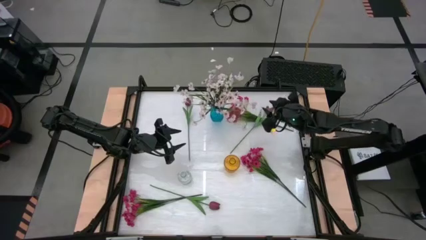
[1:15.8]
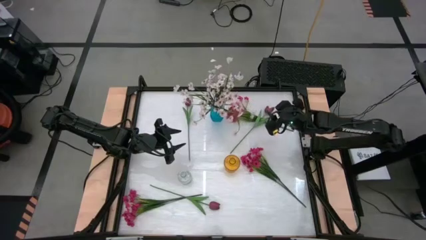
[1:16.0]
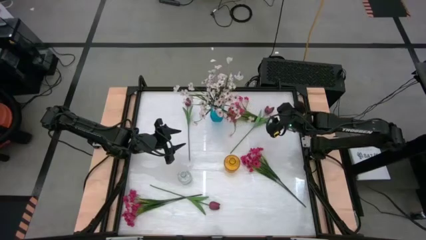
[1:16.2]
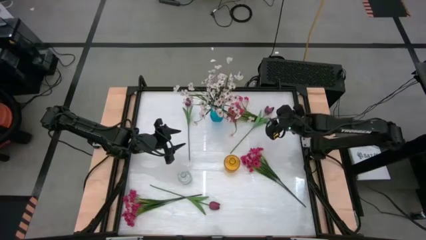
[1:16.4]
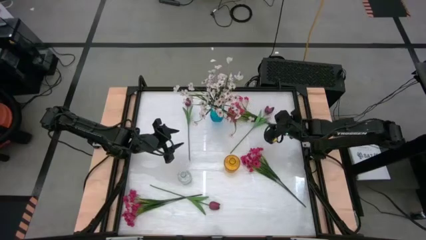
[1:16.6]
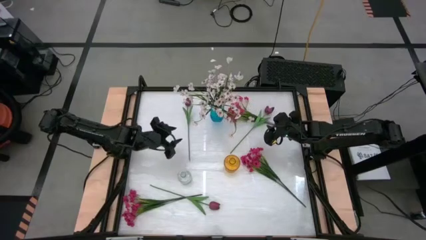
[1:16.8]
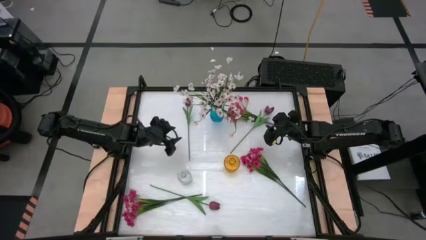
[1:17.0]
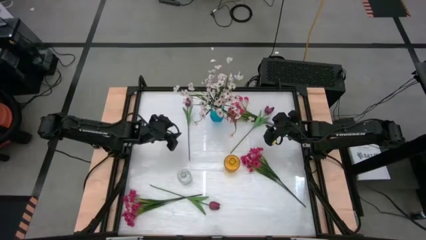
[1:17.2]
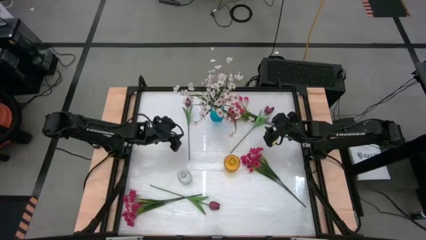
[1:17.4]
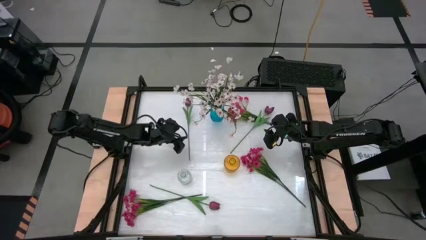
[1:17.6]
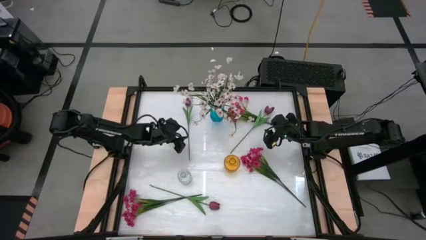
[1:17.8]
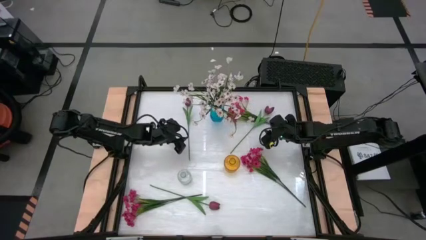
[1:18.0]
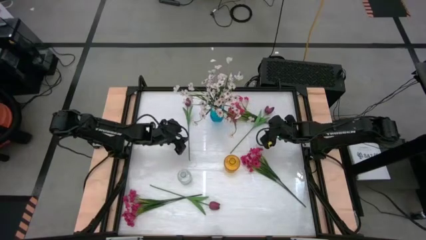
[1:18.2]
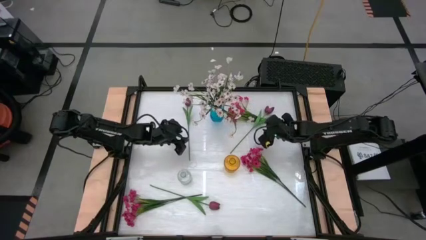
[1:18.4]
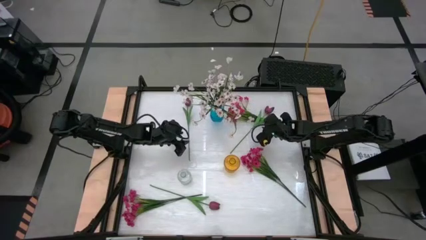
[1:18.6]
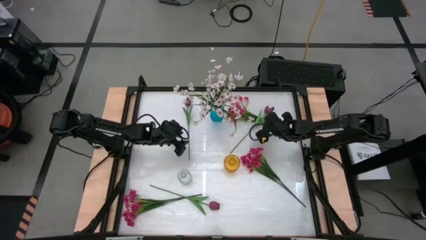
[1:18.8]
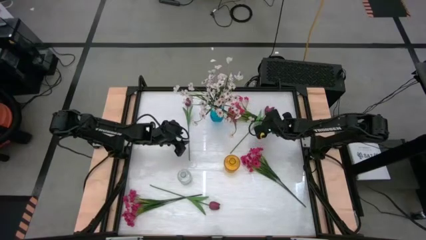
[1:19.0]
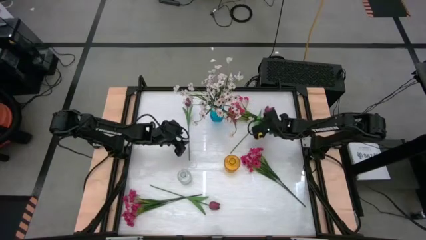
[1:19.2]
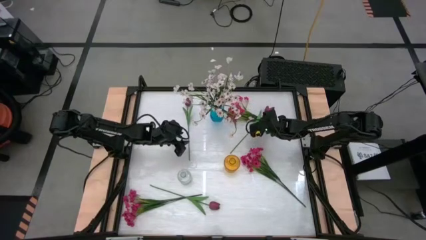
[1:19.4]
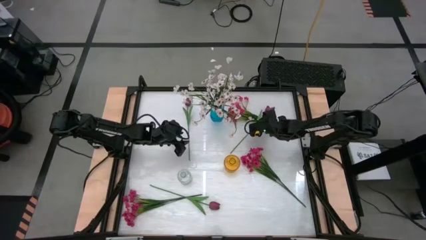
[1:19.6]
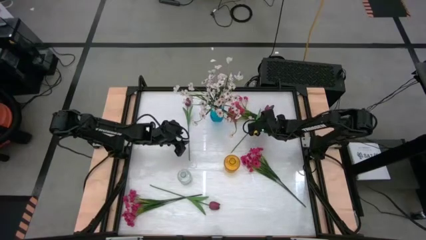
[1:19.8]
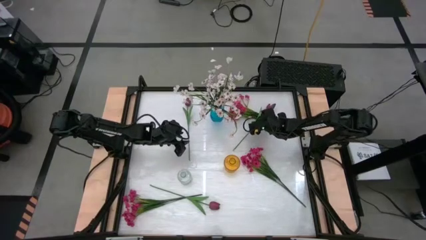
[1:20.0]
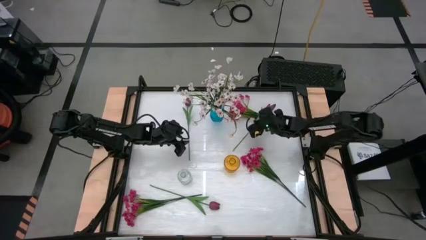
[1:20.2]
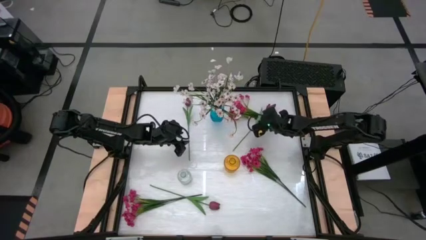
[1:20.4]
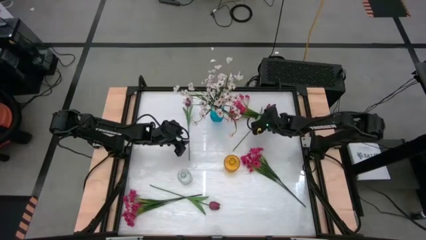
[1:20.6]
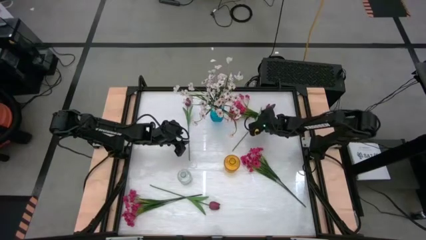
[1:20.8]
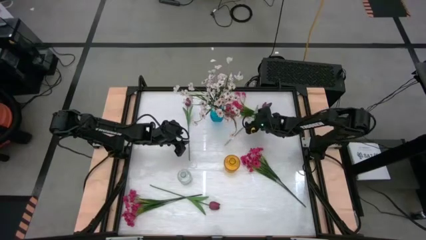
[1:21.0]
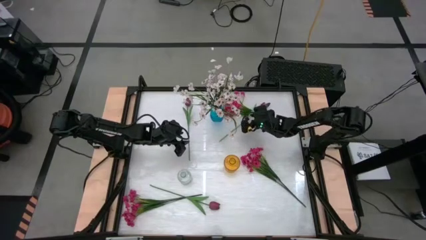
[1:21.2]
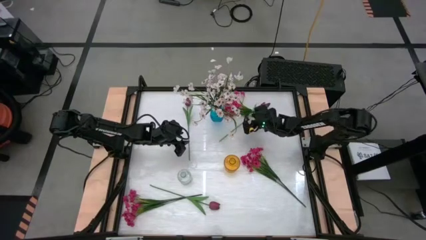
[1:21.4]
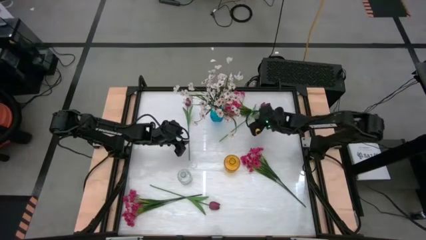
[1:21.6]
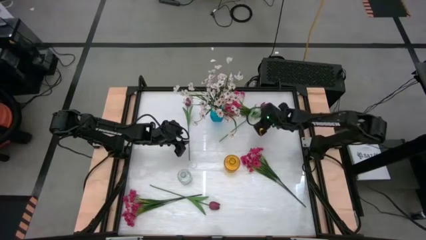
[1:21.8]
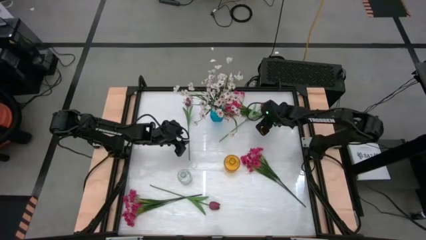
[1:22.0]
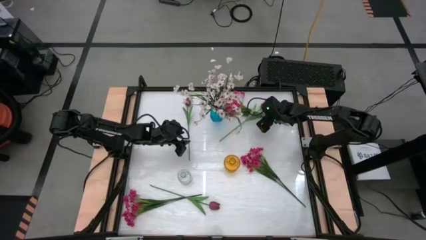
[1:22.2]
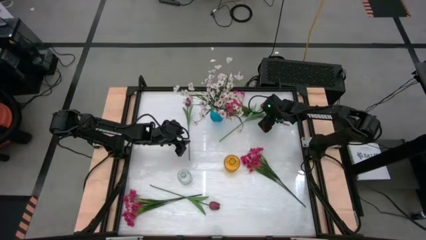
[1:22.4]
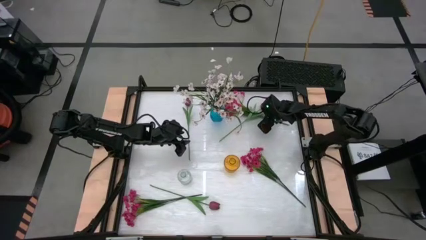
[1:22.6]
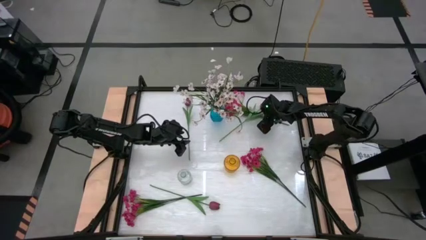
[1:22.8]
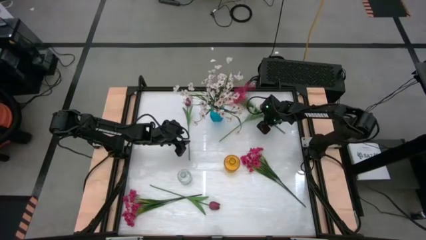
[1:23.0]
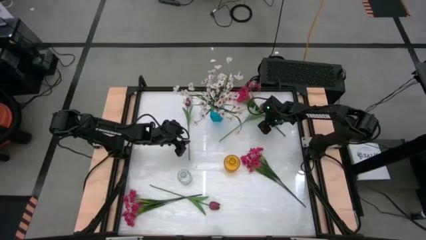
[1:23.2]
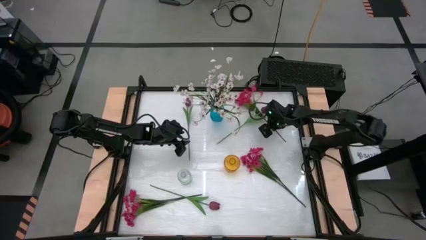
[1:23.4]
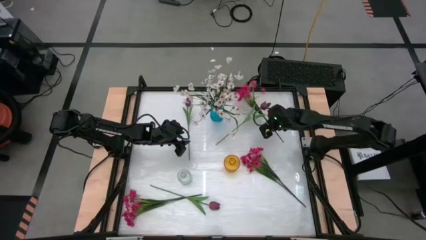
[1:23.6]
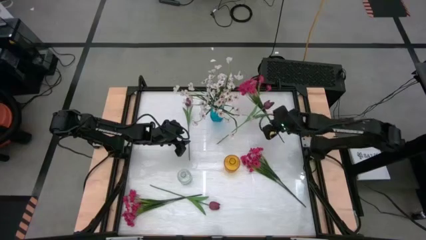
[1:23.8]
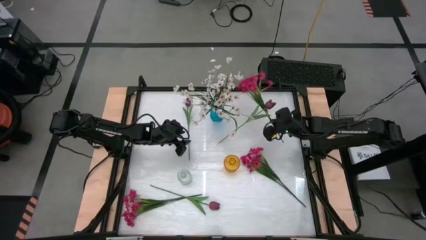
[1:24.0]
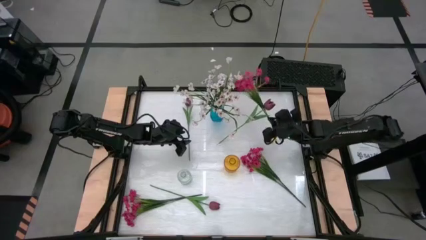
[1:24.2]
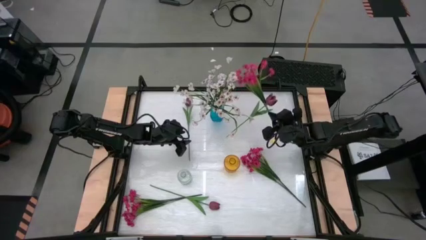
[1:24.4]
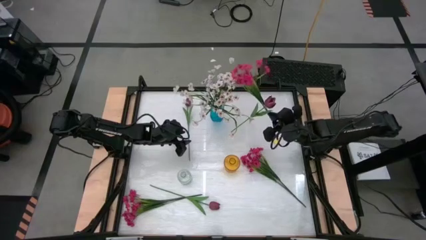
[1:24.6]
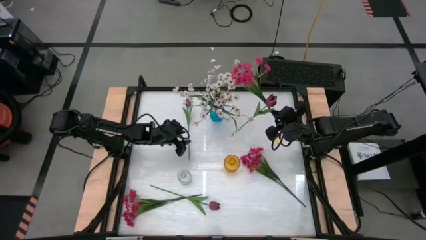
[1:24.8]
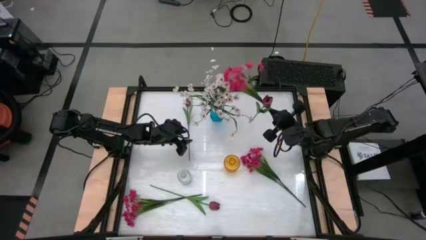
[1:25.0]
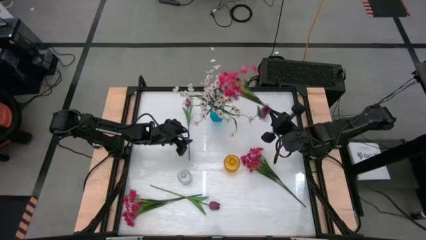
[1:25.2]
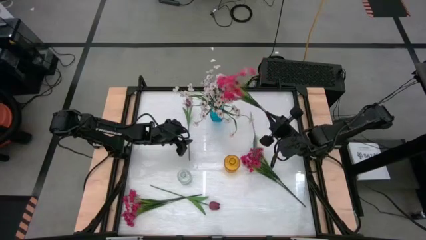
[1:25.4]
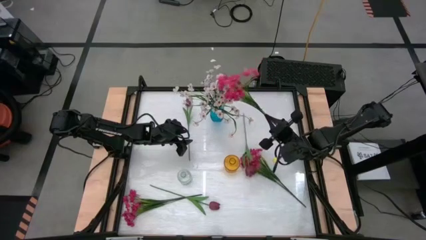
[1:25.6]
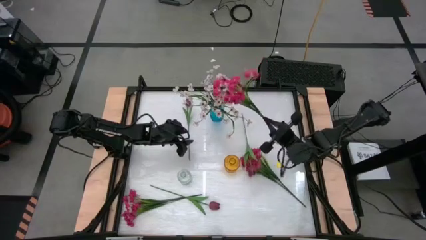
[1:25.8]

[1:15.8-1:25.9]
Task: Sort flowers into vase by color
Put the top pink flowers into the yellow vase
